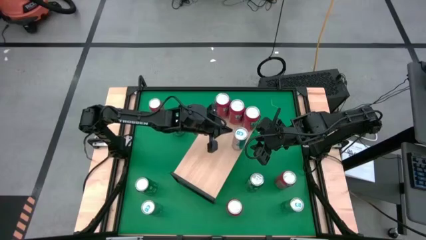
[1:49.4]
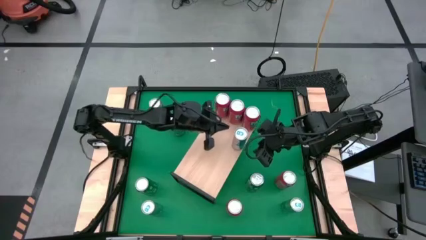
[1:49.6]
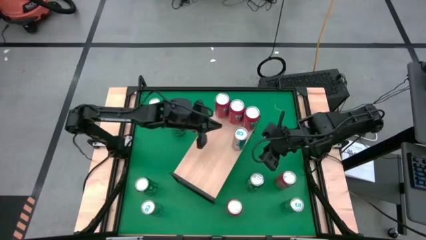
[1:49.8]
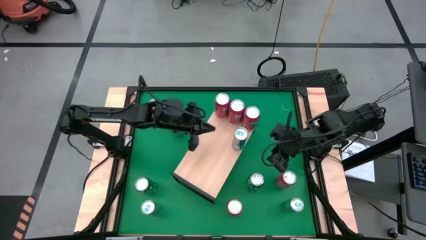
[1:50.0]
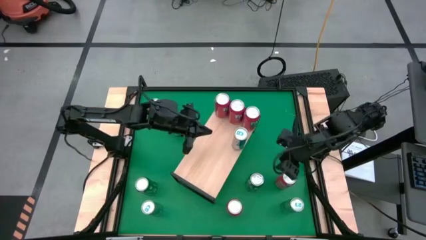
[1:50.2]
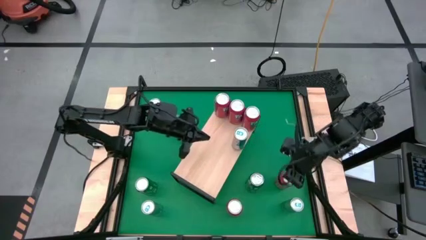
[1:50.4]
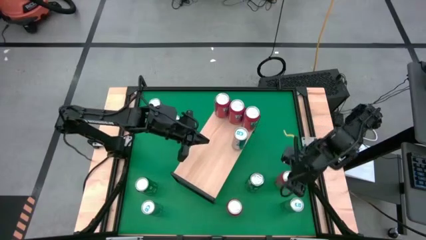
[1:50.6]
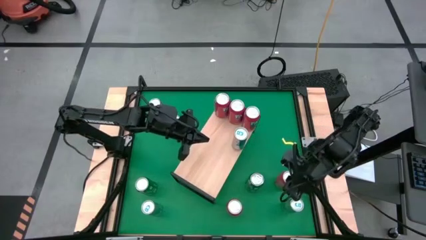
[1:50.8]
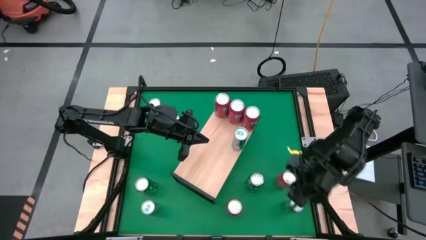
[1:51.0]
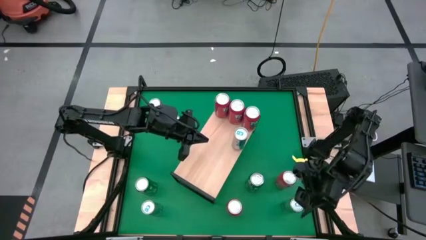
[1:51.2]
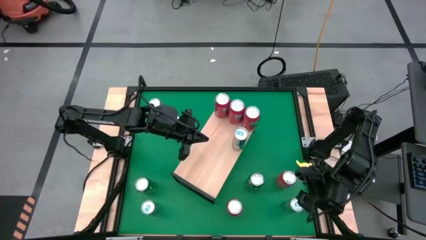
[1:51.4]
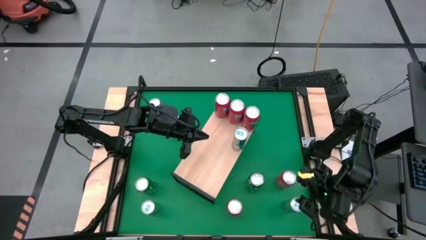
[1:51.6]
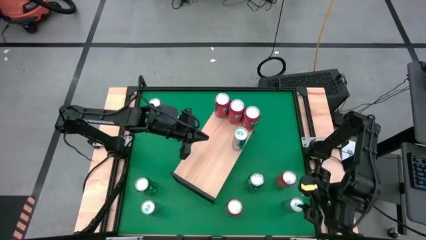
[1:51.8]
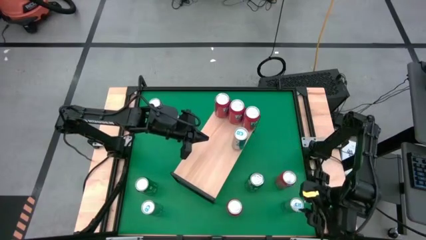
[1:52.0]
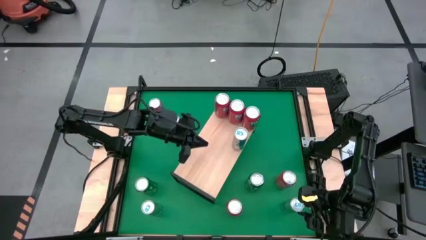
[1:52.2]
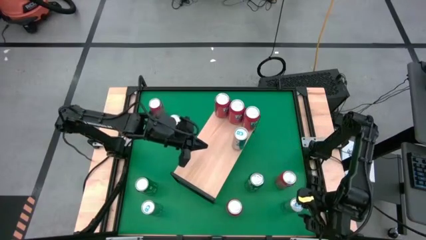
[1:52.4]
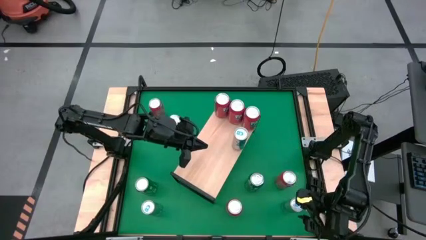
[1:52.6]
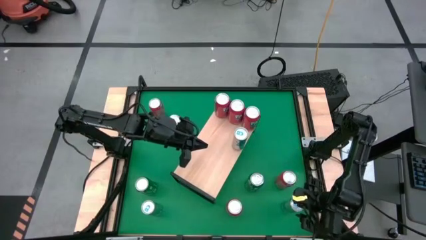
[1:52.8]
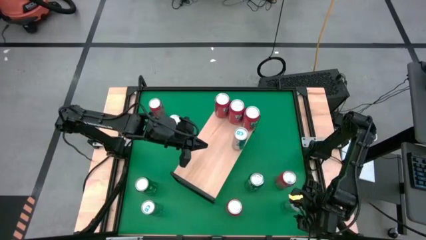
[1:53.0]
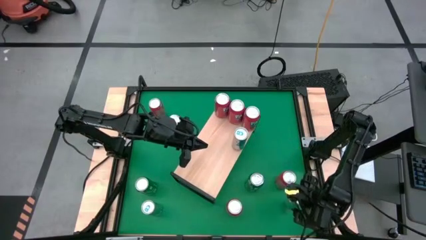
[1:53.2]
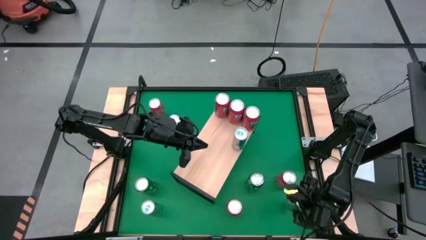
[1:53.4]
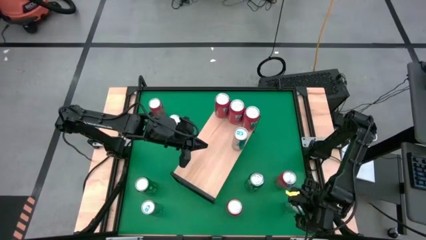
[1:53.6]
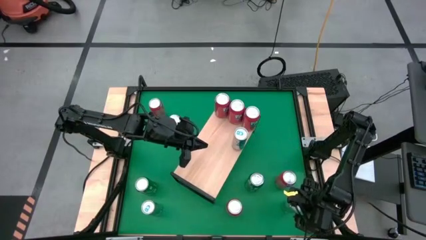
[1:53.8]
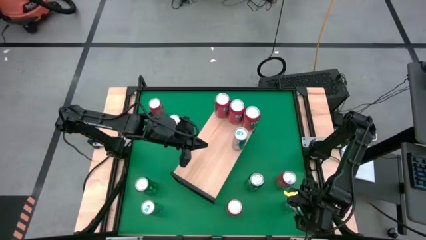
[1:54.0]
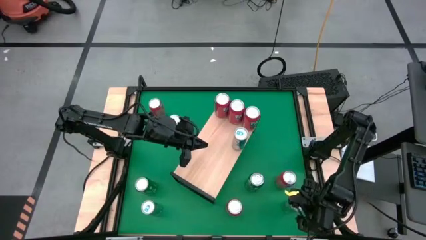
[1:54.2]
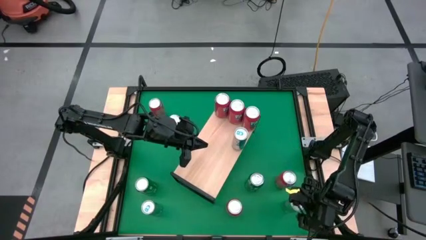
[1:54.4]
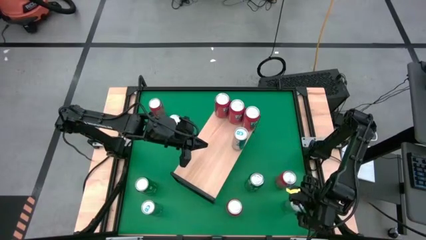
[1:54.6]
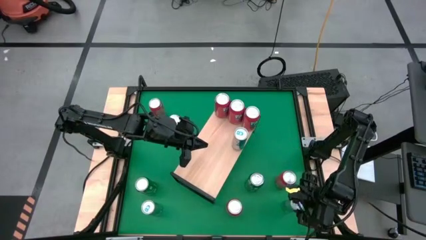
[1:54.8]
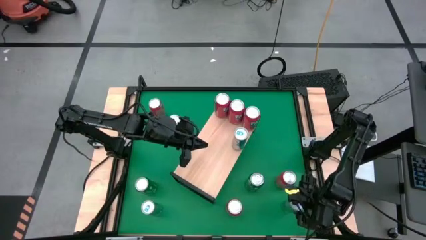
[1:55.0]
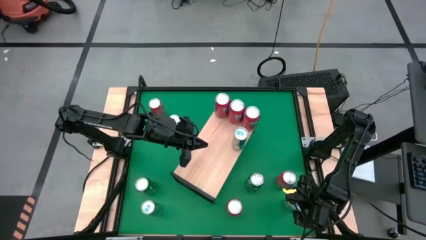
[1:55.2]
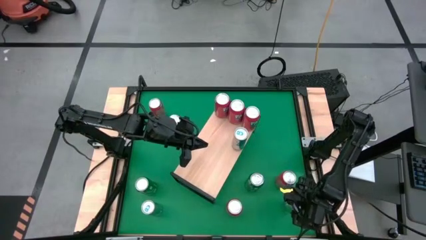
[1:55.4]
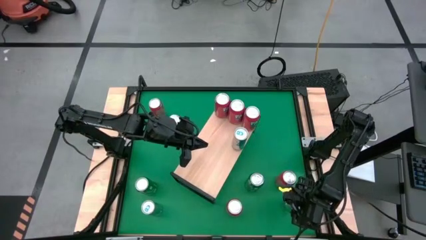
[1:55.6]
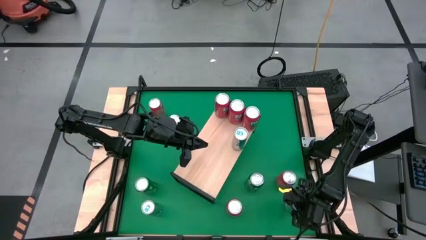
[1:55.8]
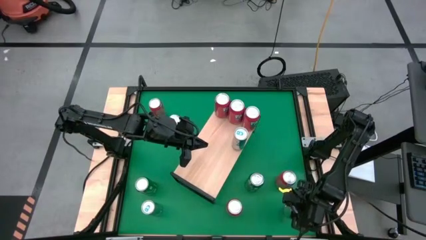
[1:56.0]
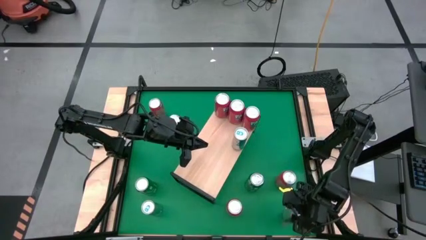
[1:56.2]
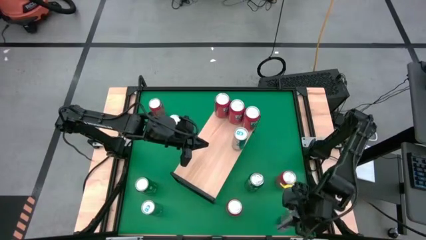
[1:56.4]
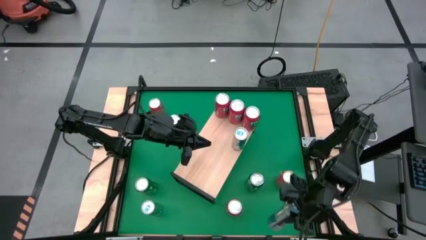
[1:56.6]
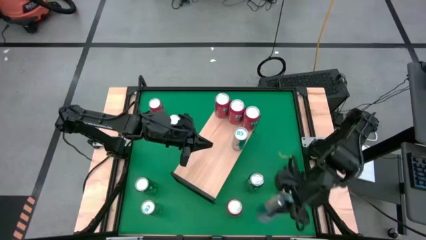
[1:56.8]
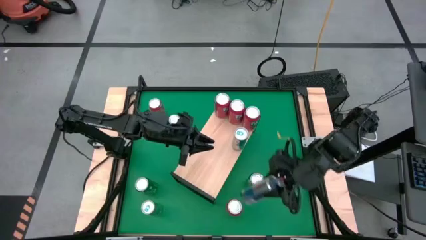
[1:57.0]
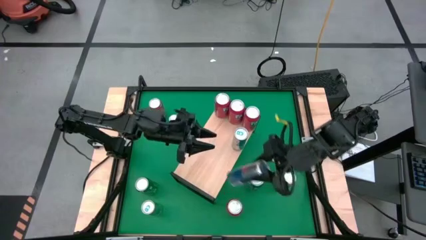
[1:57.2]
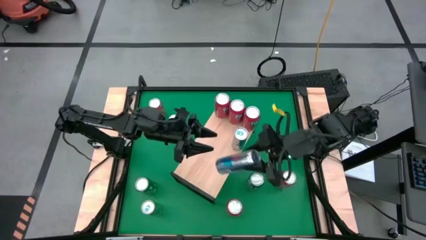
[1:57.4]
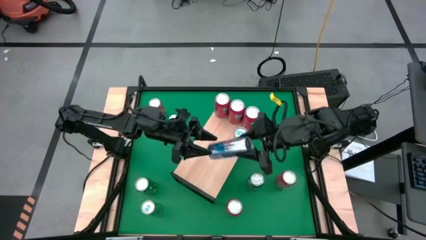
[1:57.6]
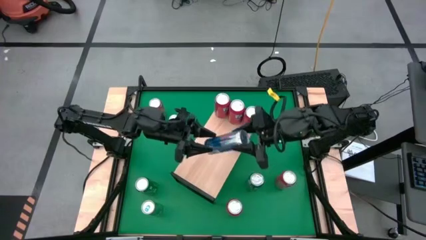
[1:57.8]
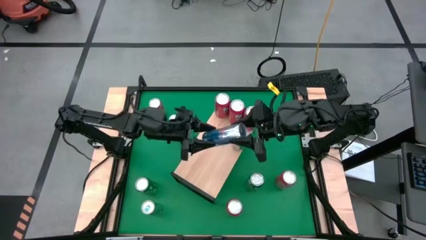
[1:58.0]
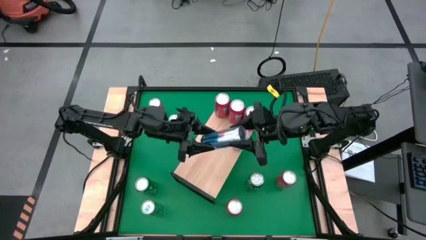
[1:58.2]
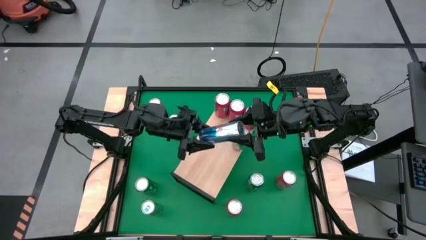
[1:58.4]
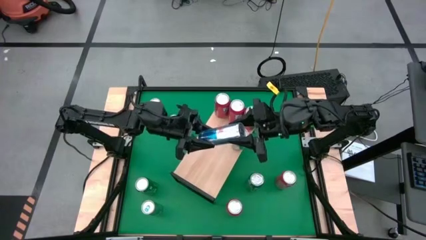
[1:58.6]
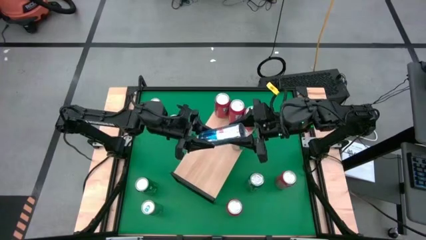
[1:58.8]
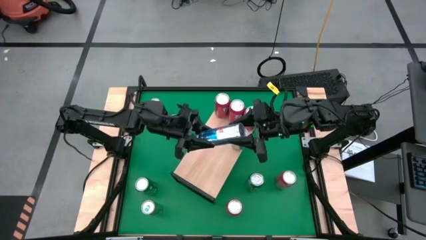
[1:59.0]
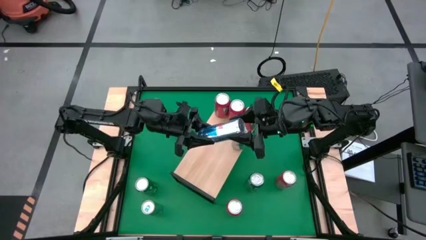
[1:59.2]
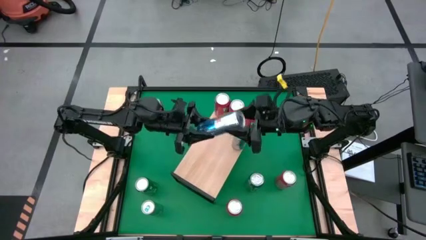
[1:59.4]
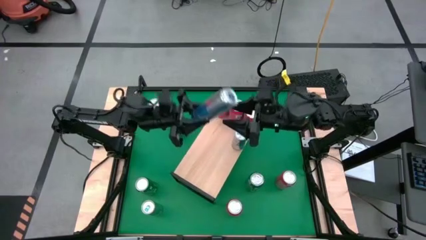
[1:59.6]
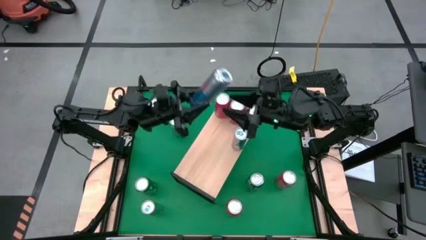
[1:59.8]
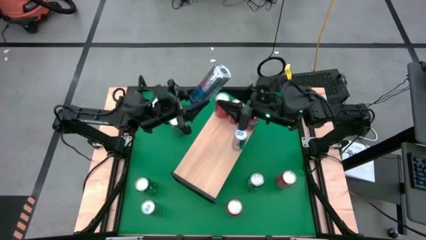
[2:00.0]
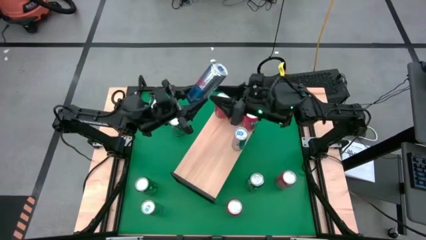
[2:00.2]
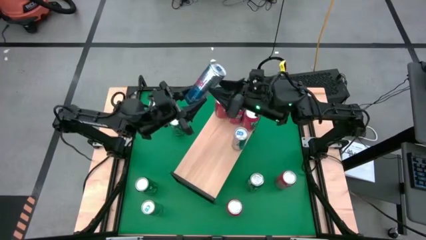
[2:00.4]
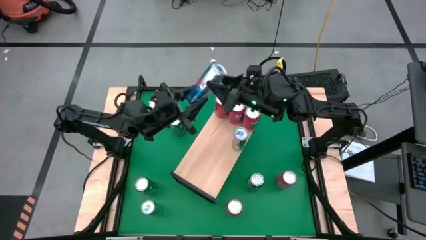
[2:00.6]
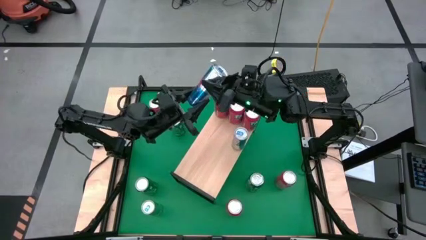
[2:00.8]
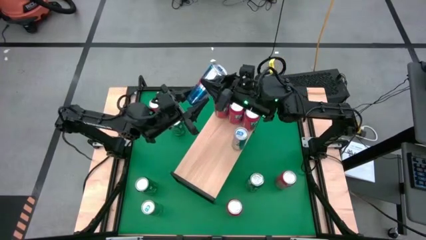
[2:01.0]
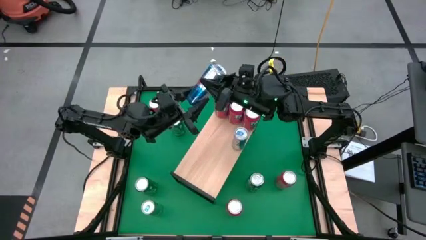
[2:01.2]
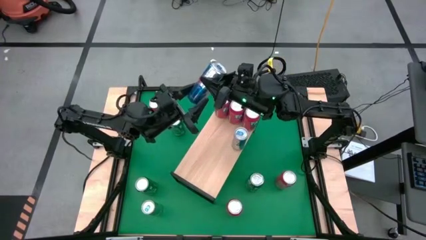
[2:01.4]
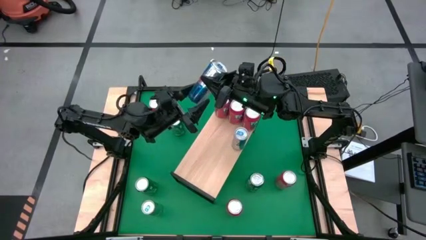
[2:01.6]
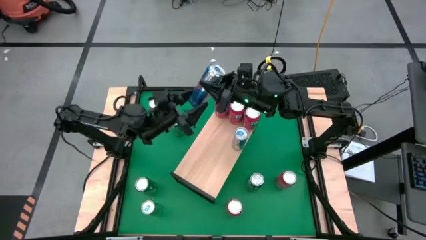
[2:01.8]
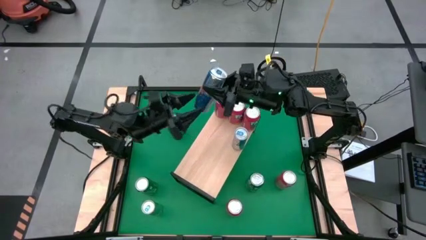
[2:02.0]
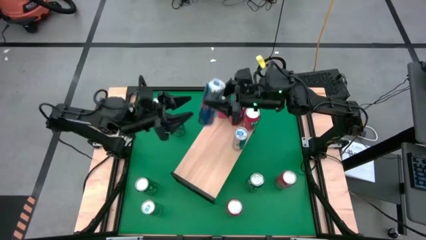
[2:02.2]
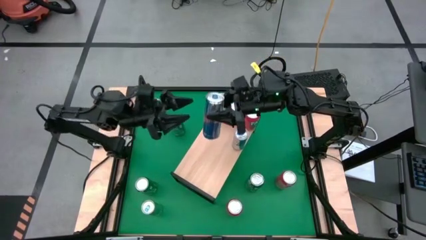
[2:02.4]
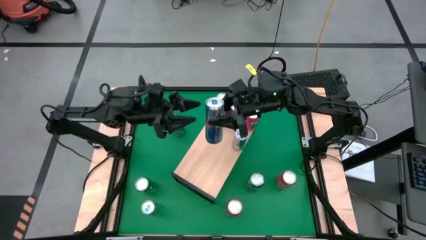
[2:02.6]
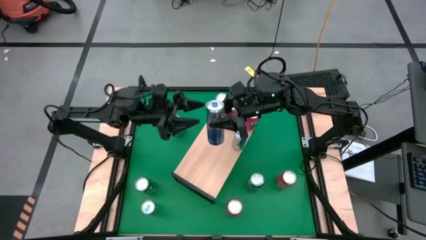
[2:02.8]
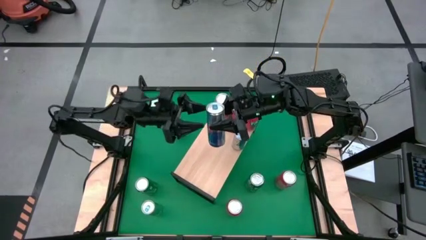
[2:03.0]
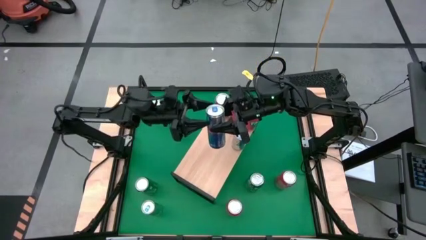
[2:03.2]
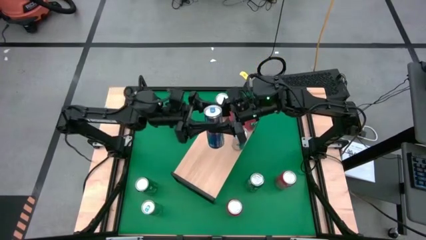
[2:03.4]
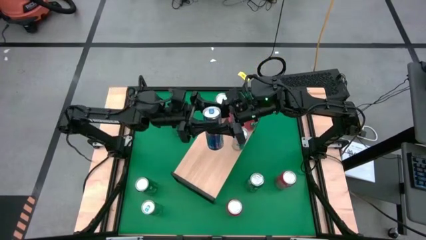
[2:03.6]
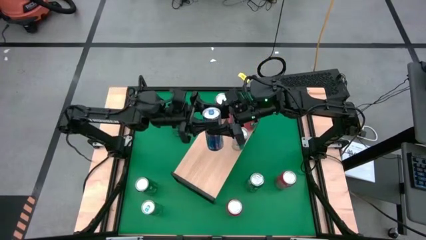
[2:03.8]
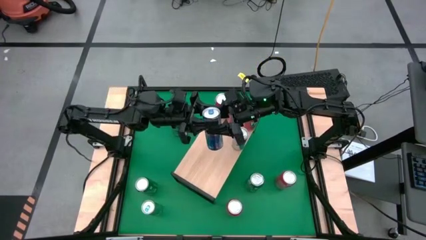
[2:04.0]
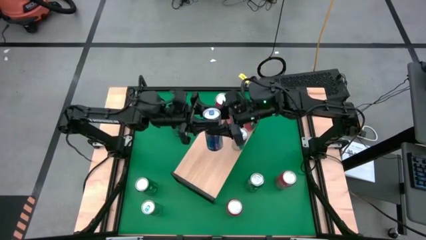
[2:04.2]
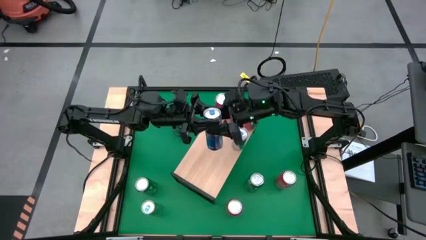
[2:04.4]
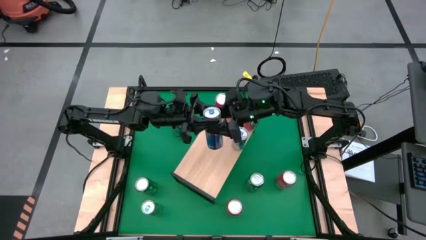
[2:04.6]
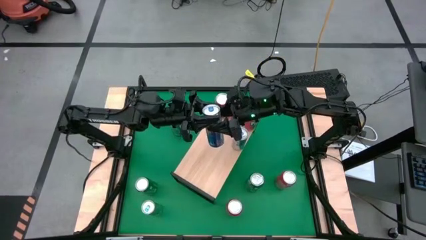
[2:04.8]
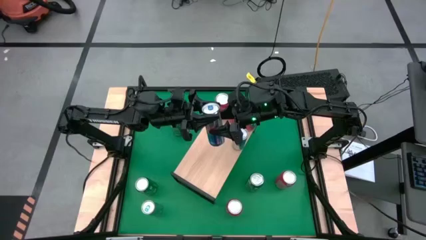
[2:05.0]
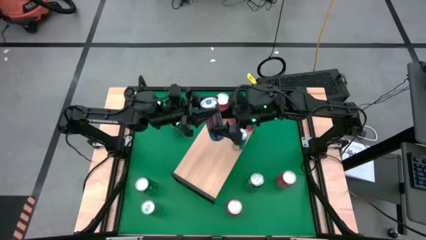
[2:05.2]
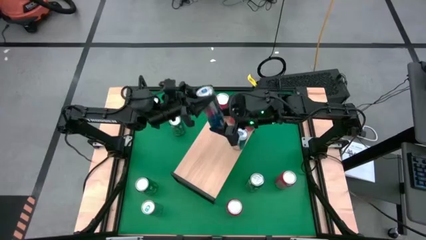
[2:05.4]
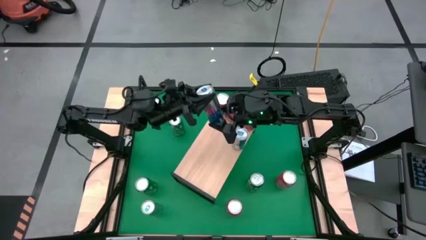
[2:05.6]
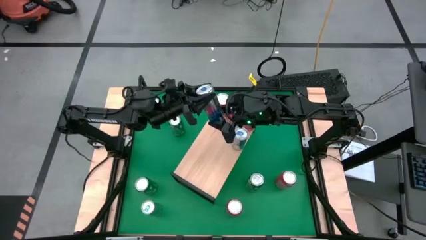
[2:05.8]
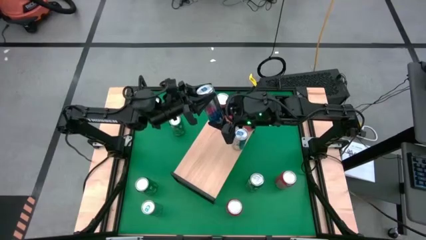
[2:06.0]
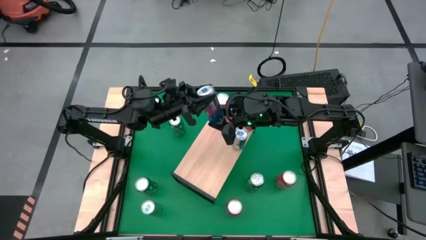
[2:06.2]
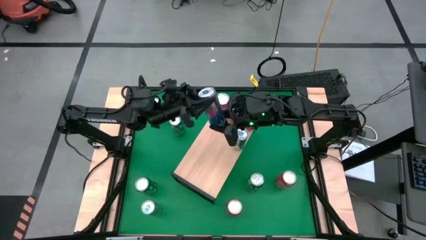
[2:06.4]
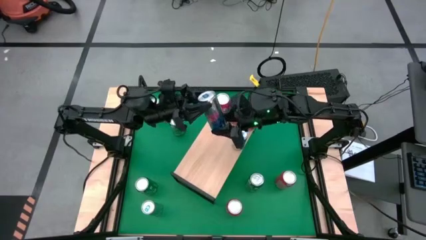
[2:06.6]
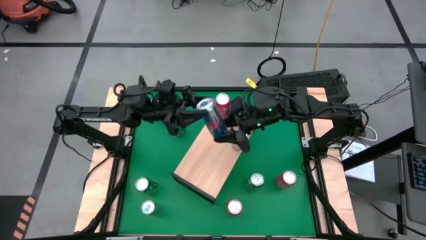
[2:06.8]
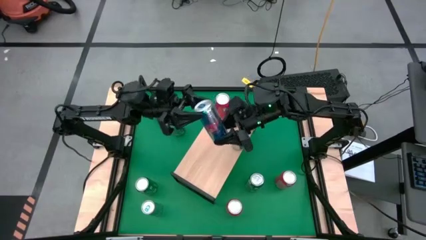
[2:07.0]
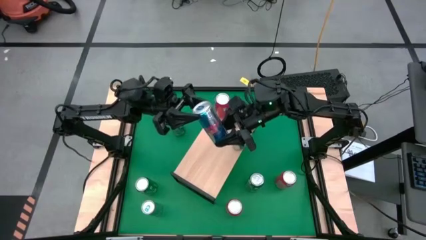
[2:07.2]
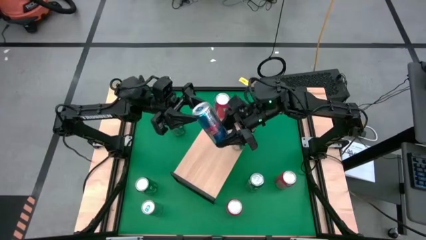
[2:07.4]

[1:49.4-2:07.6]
Task: Sort soda cans
Put the blue soda can on the shelf and align it with the other blue soda can
